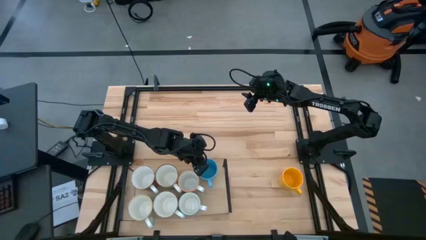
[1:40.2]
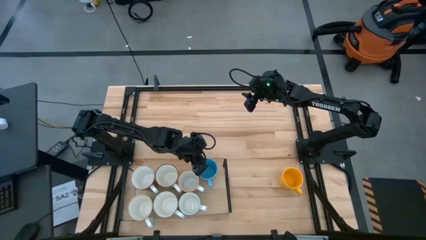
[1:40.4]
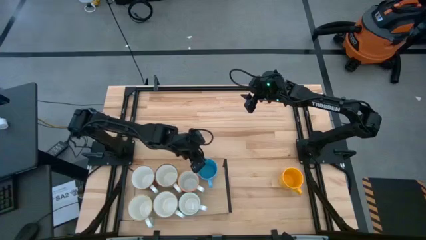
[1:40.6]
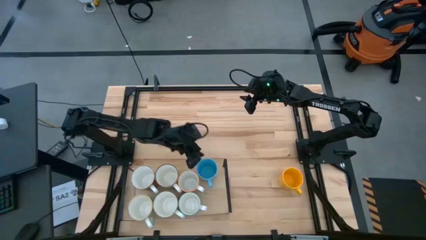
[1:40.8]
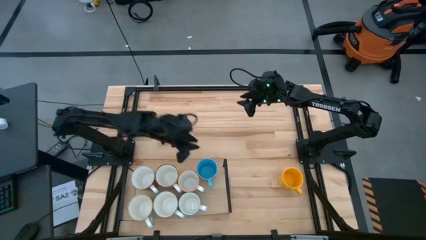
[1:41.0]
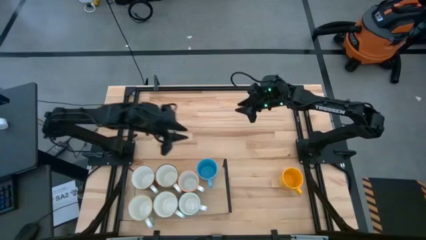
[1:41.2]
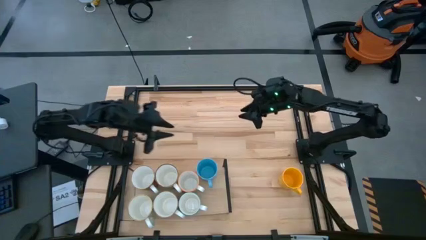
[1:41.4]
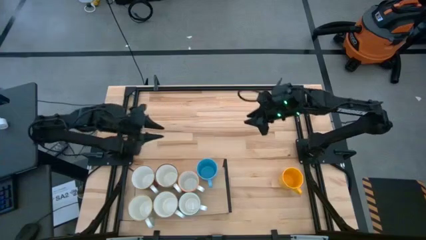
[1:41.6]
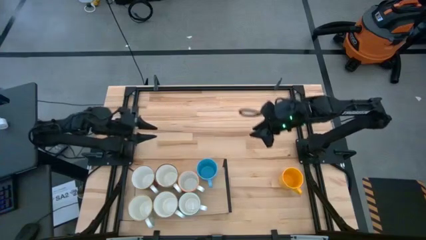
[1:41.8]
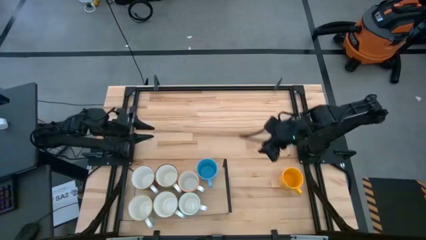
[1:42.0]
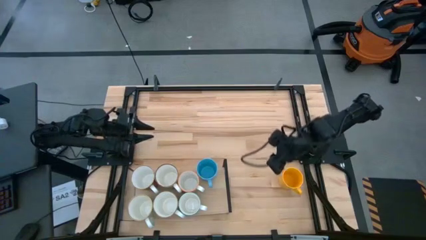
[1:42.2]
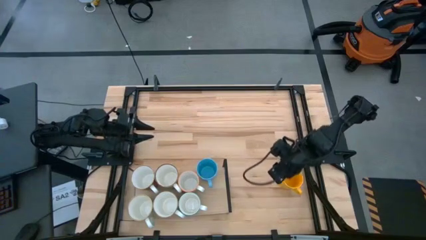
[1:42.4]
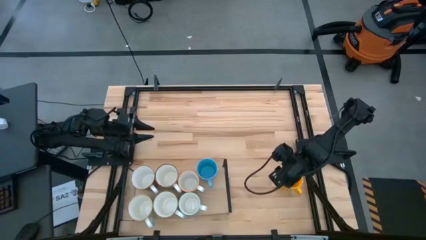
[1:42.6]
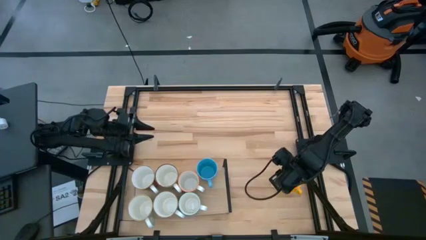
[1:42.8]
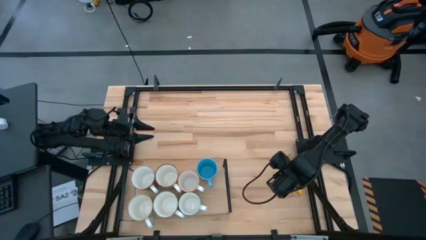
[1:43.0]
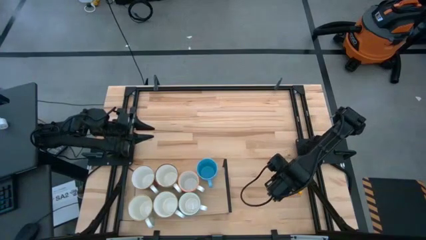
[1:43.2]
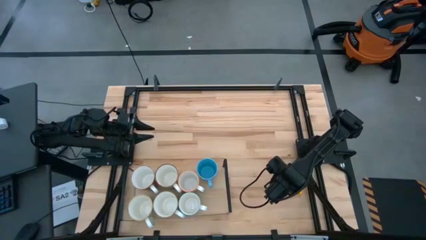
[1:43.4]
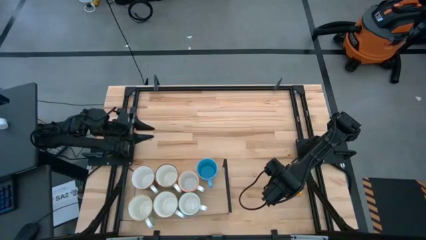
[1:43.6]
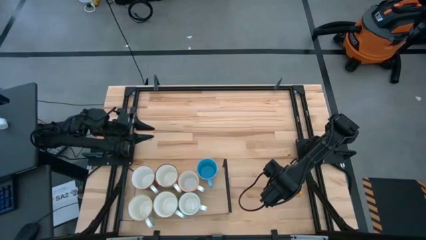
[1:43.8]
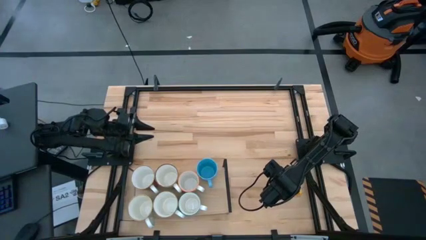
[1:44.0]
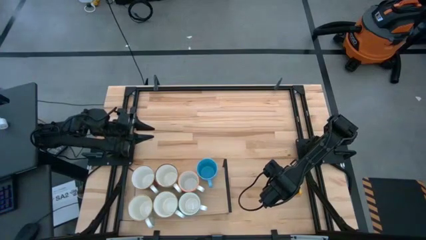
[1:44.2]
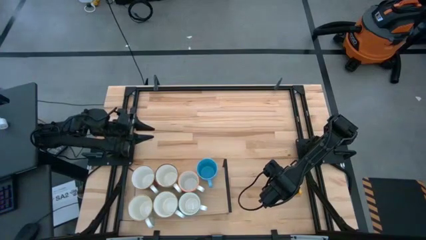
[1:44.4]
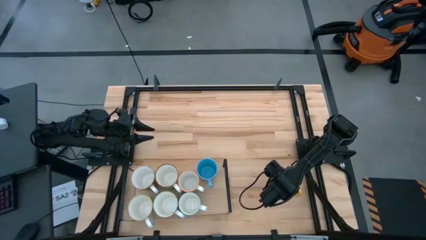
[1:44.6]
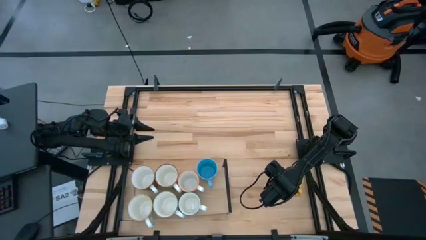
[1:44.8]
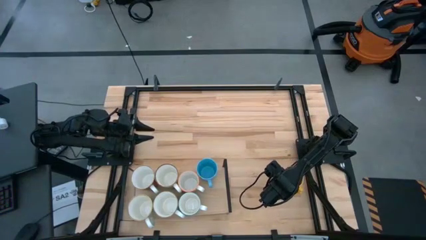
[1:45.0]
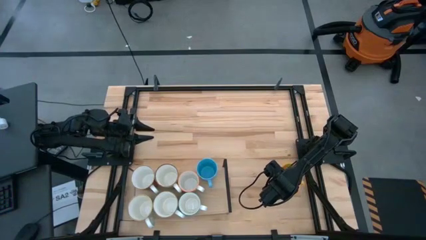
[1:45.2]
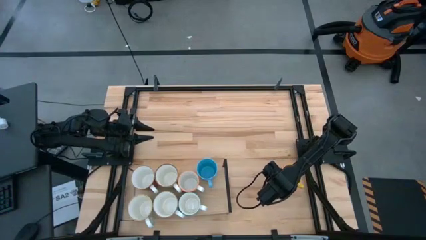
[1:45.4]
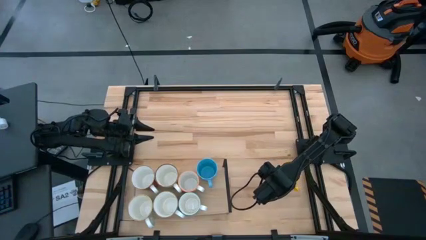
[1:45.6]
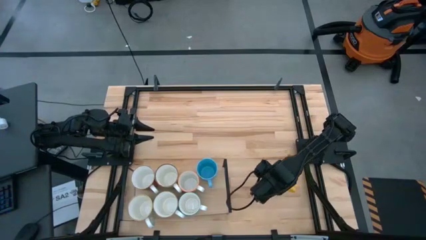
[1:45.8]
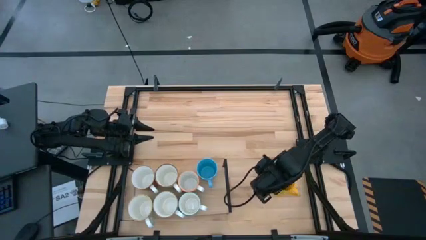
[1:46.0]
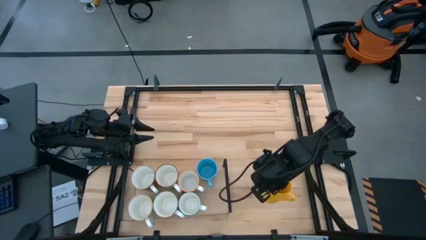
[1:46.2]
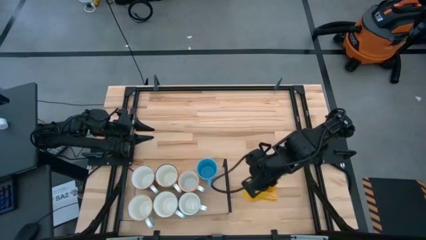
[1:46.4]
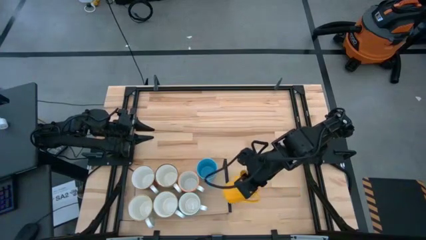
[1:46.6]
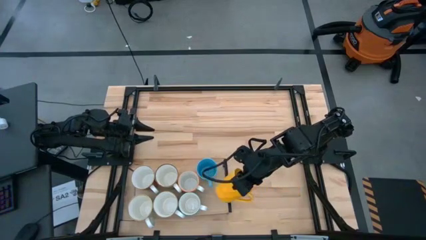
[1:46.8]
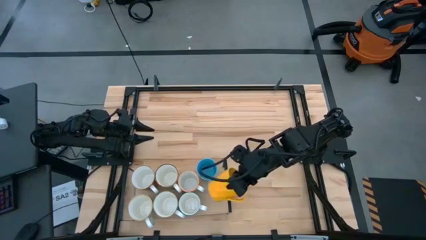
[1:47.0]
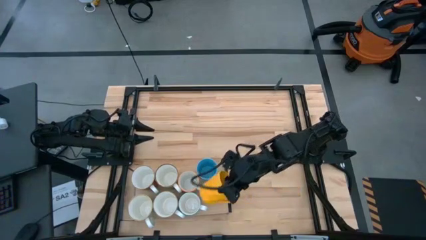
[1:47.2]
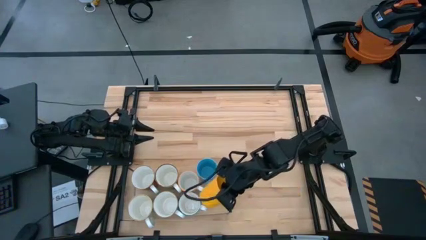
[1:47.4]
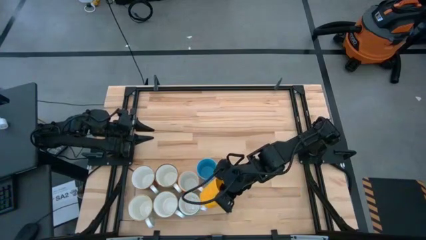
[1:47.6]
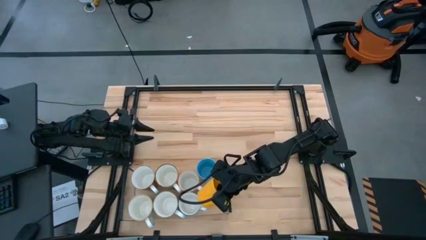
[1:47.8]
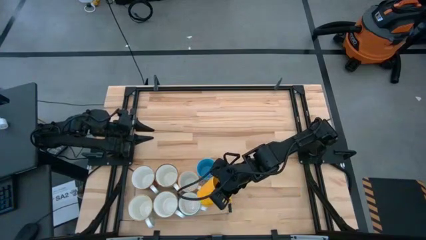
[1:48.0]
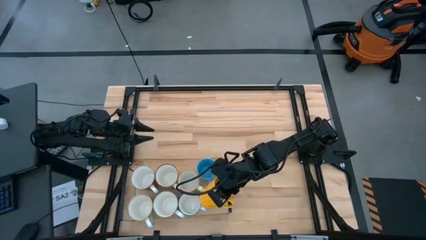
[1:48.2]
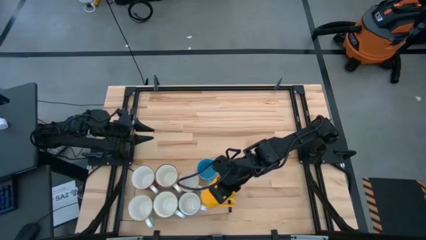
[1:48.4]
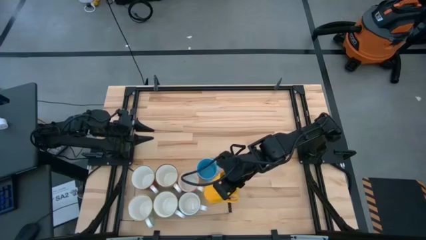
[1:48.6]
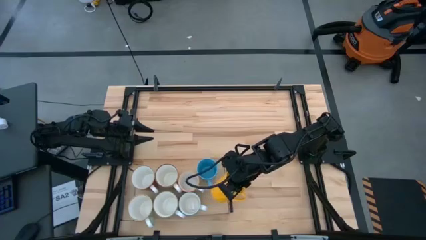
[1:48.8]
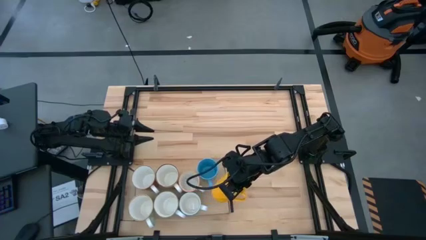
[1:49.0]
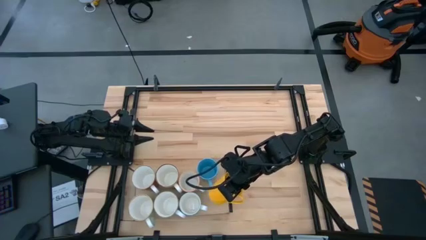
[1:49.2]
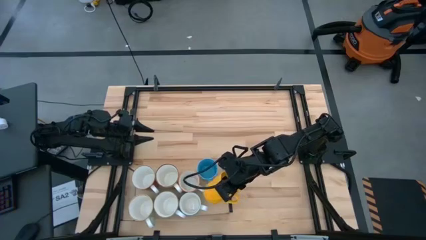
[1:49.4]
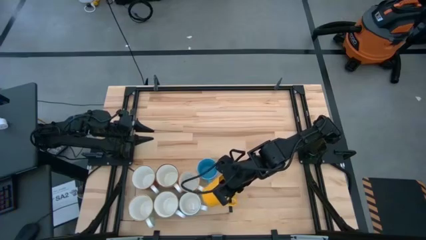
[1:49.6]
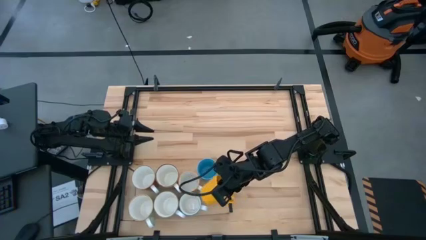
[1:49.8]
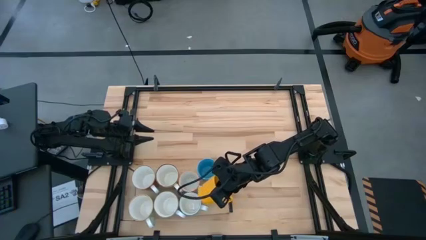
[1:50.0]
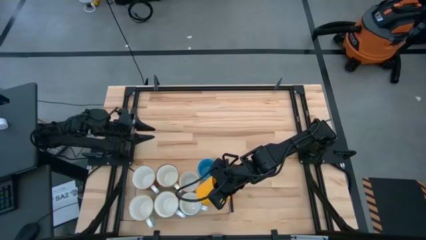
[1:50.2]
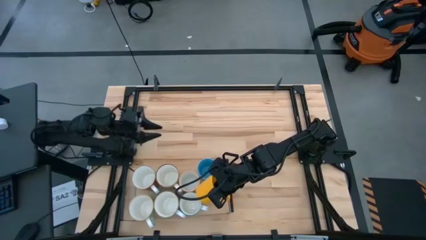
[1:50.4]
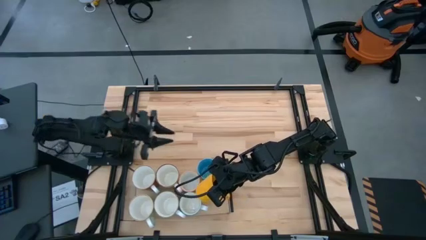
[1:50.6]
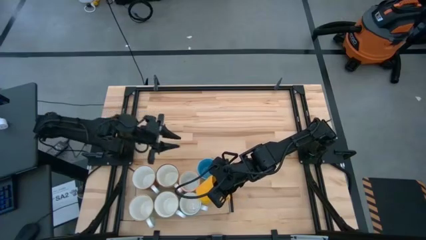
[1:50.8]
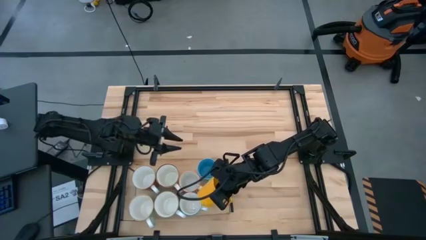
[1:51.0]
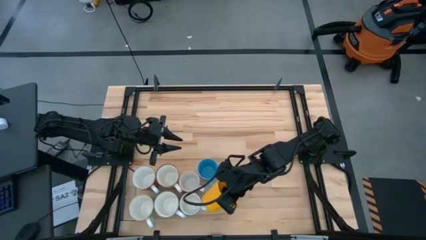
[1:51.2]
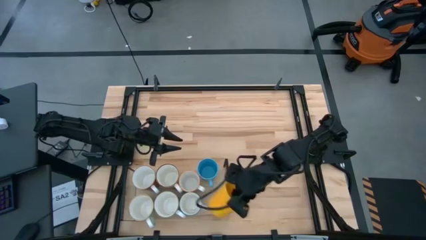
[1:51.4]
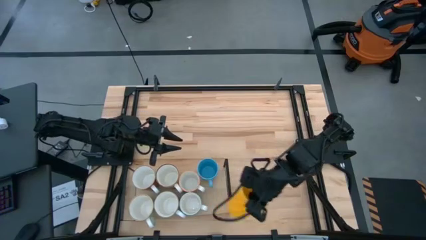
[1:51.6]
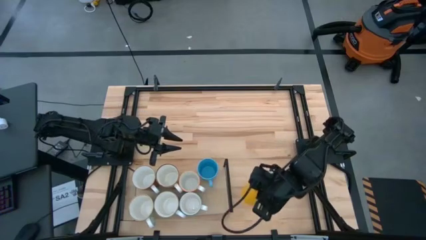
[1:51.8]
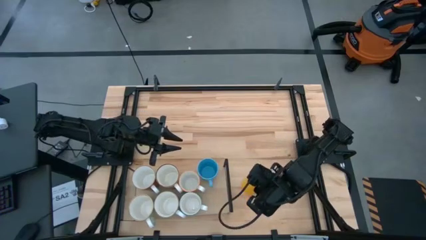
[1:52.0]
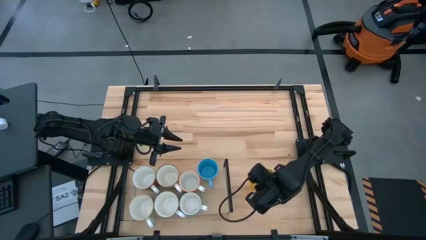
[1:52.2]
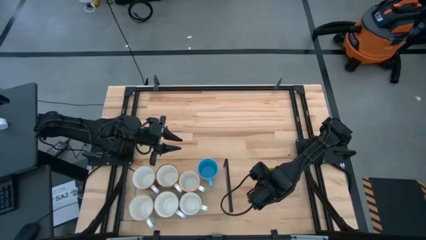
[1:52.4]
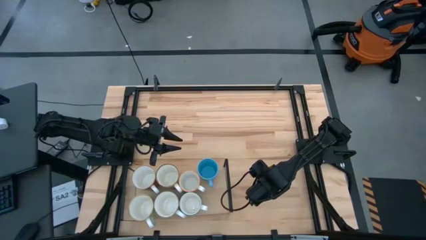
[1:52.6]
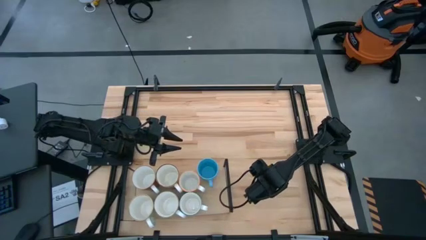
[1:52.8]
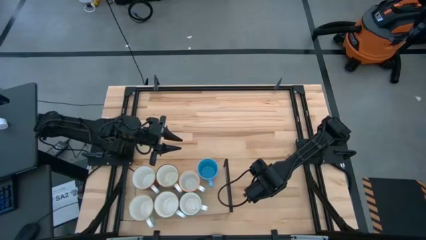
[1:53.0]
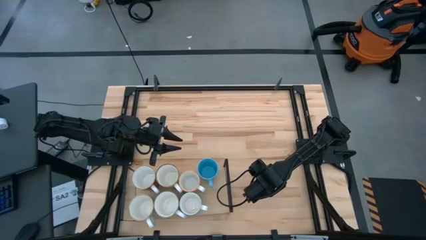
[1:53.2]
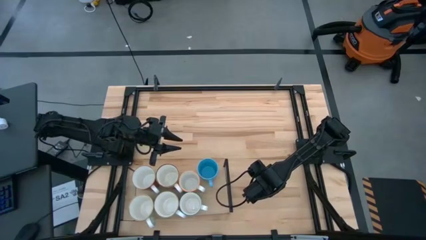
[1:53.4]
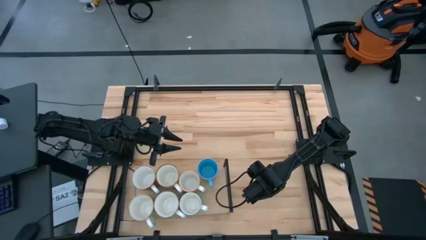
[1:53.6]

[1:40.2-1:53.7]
Task: Place coffee mugs
Put the yellow mug on the shelf
